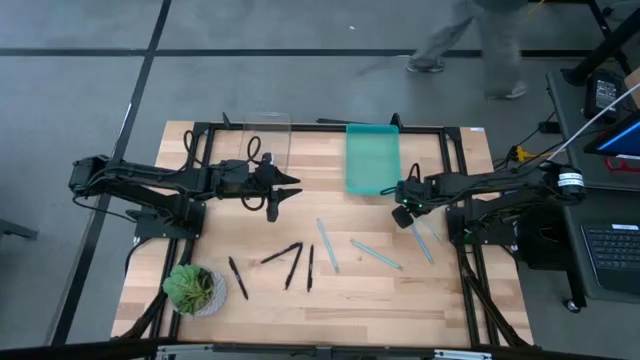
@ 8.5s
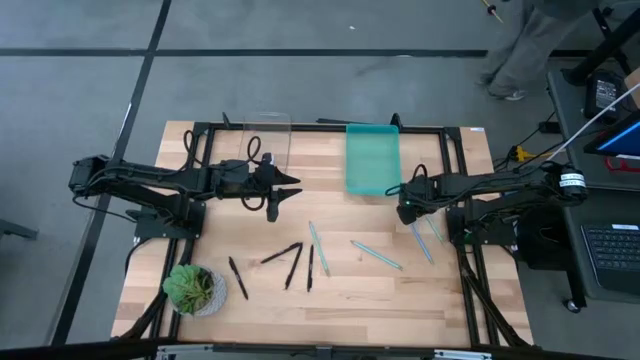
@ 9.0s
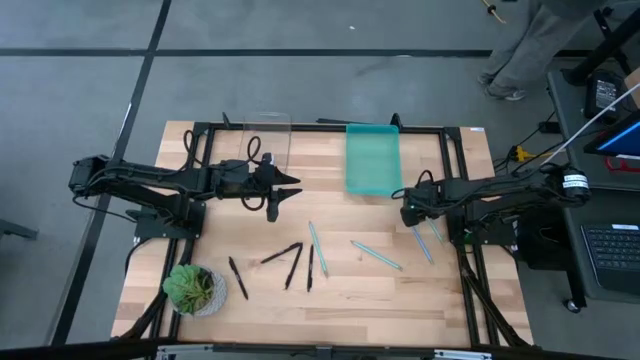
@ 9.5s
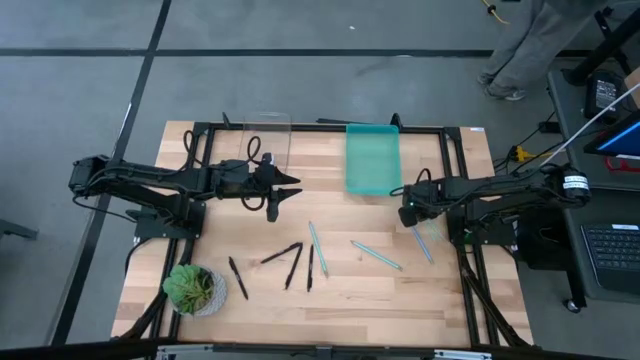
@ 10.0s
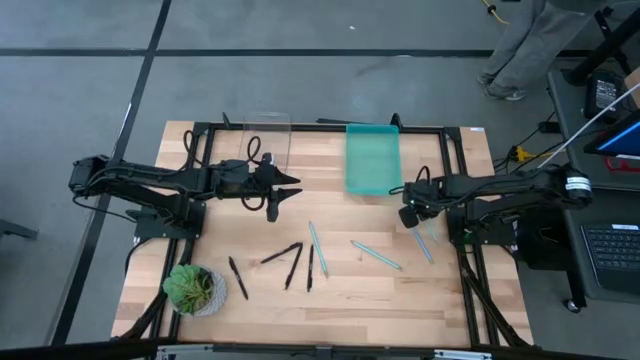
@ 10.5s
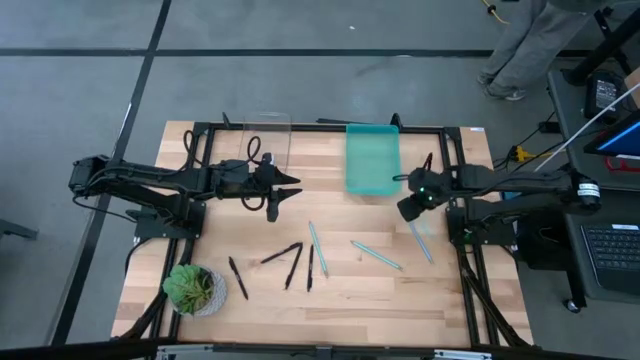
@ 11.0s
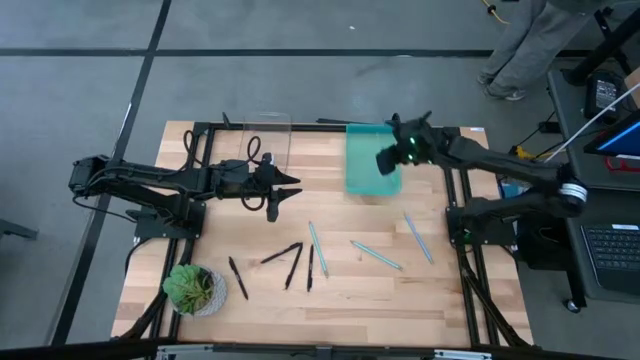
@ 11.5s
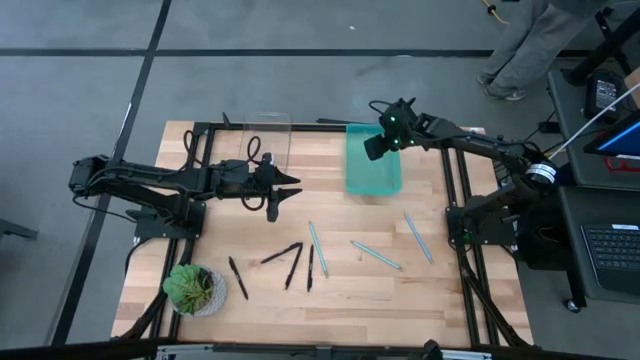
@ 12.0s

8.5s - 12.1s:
Task: Sort pens & pencils
Put the blue pencil into the blue bin

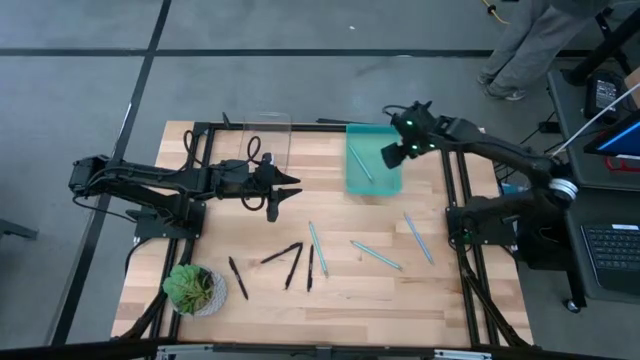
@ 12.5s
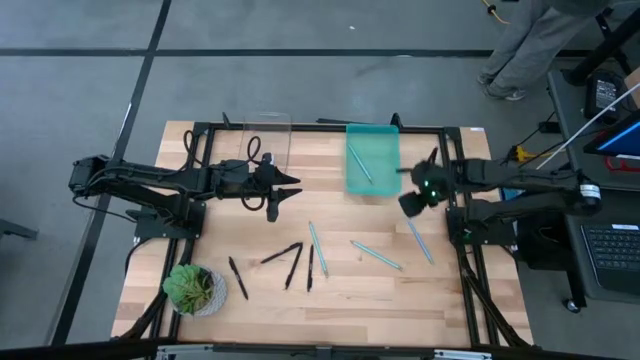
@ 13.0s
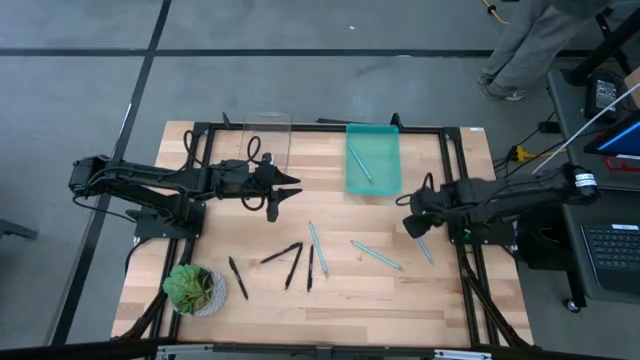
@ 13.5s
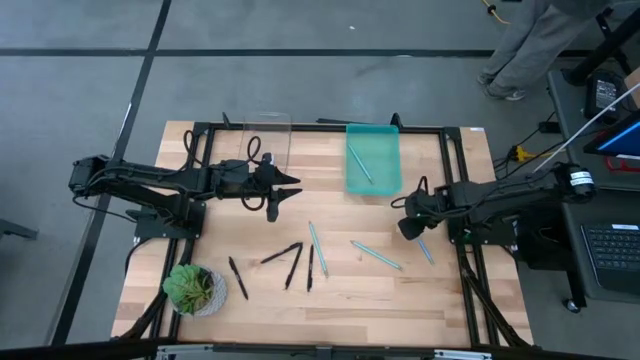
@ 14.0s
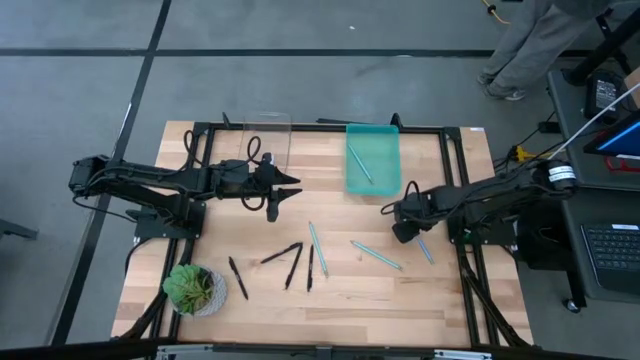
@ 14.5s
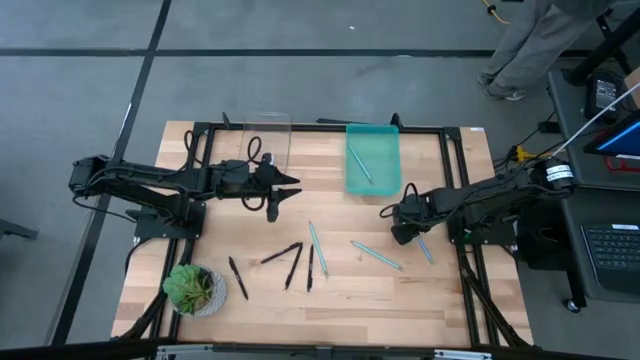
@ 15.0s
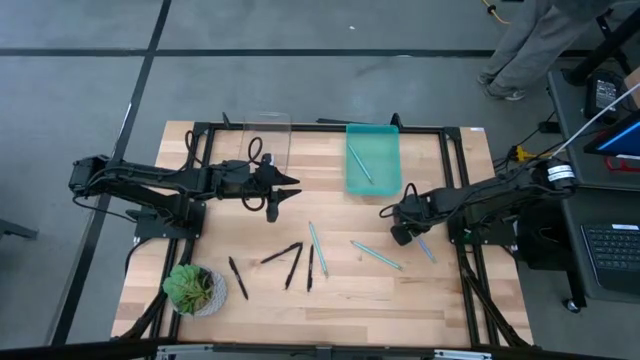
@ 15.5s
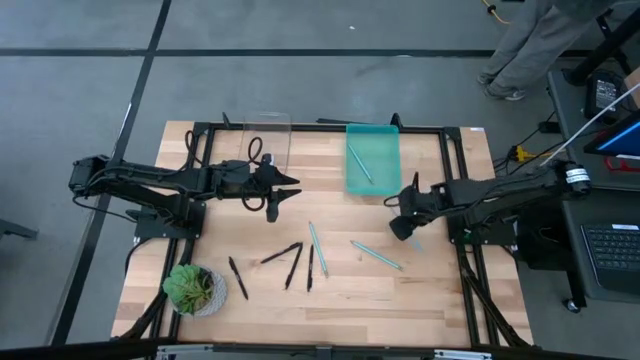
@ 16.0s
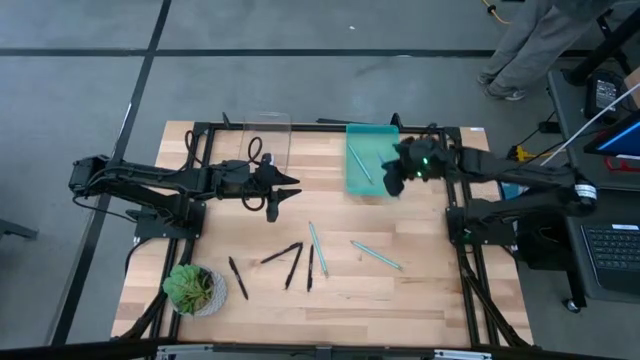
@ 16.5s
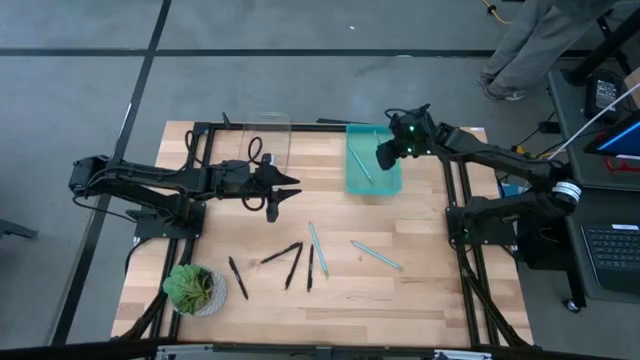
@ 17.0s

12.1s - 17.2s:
Put the blue pencil into the blue bin

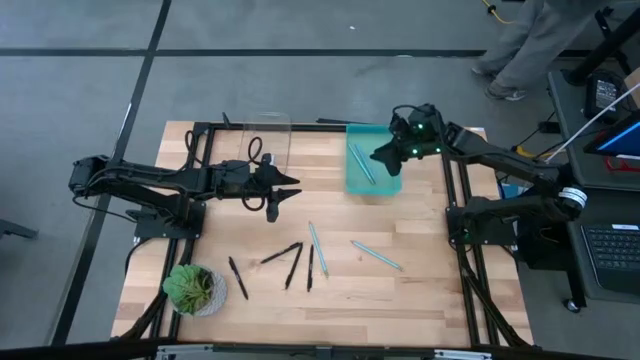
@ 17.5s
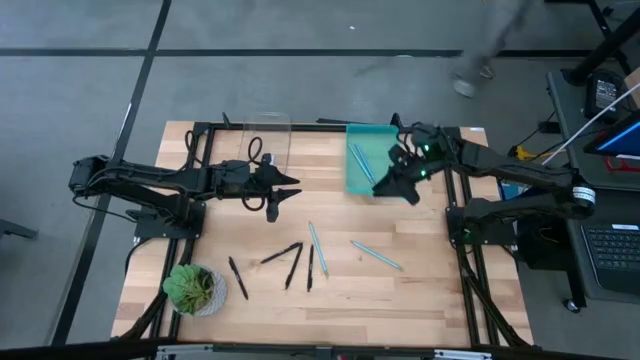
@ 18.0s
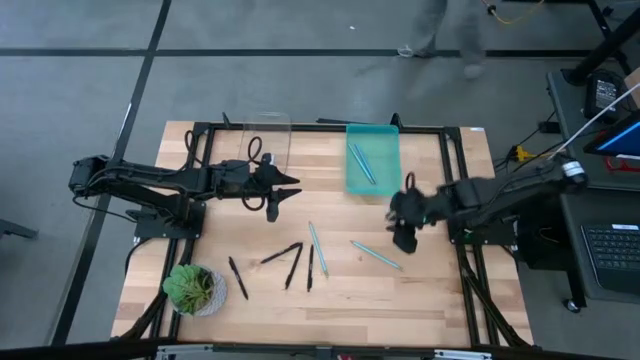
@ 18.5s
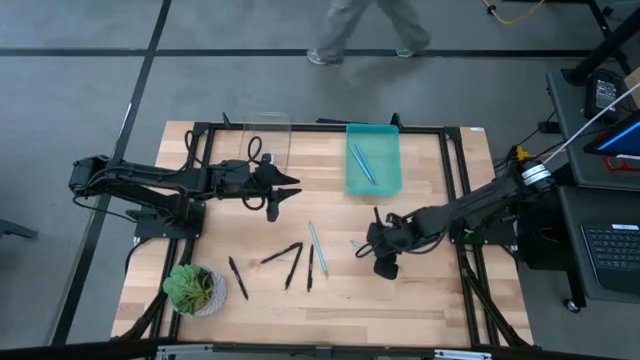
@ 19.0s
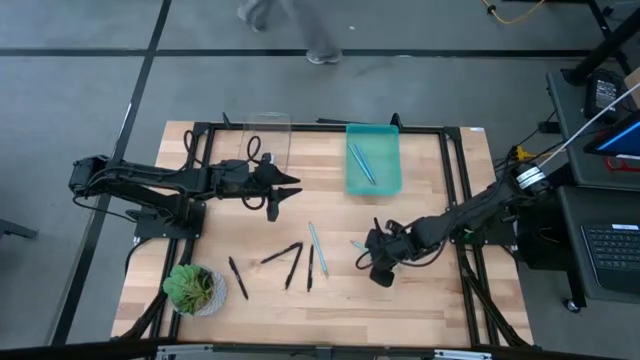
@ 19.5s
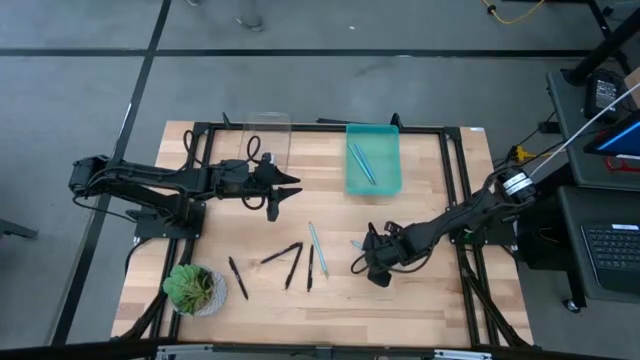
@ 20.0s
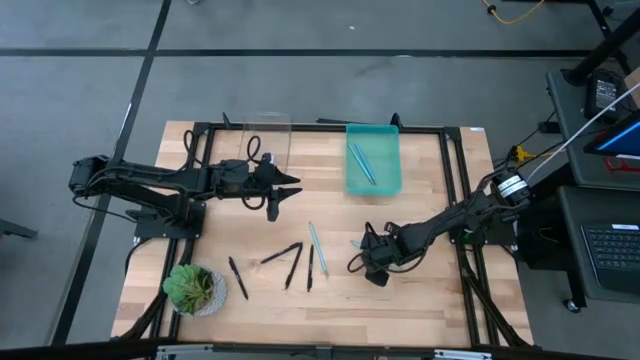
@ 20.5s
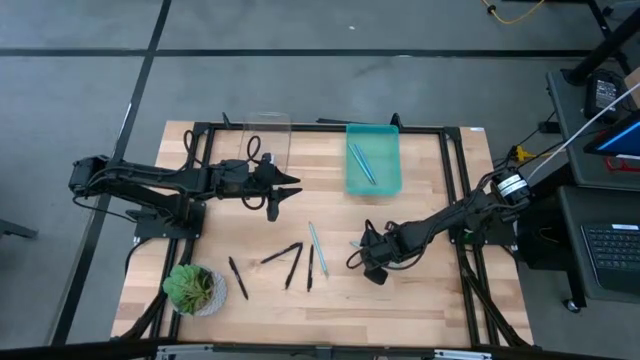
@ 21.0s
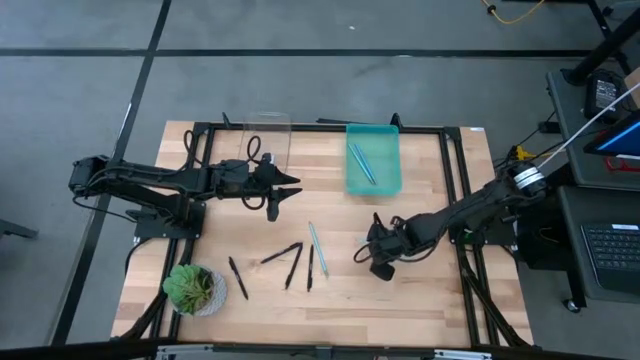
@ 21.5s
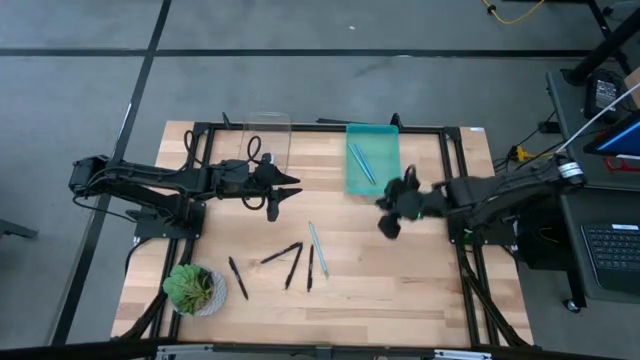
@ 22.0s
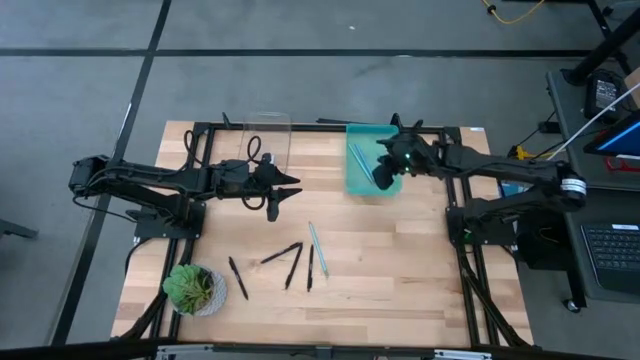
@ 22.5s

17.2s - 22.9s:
Put the blue pencil into the blue bin

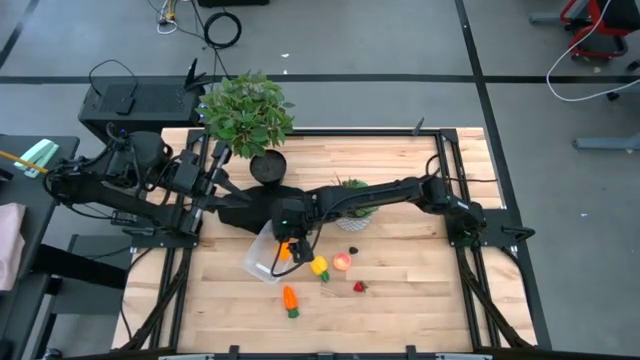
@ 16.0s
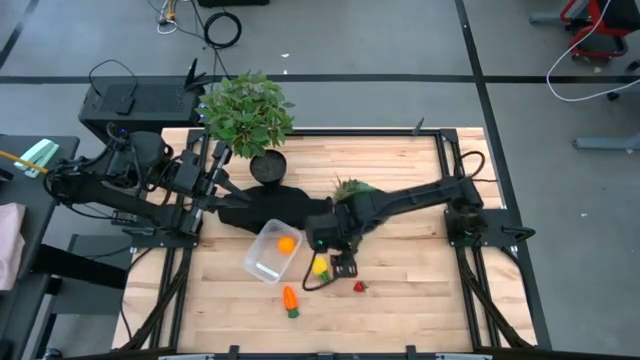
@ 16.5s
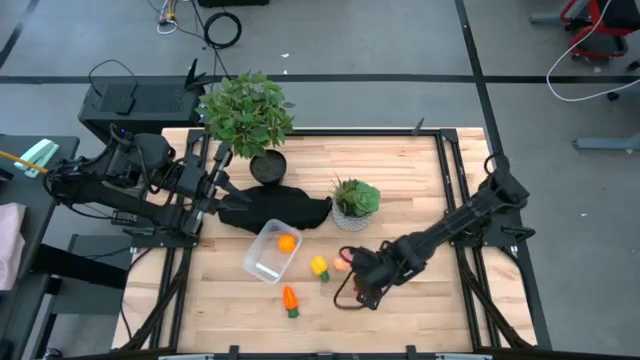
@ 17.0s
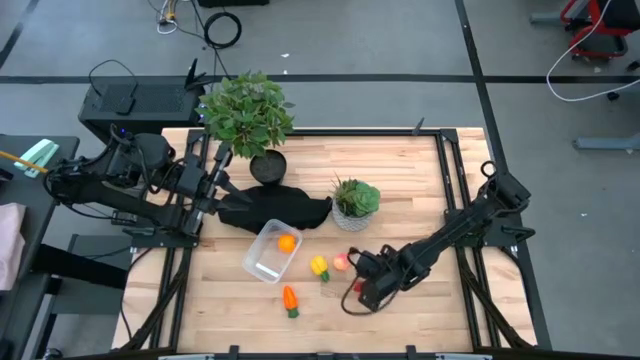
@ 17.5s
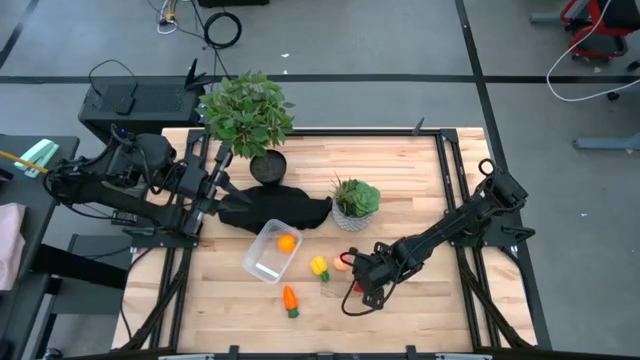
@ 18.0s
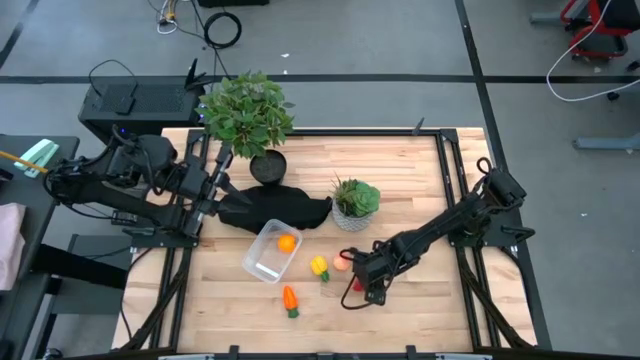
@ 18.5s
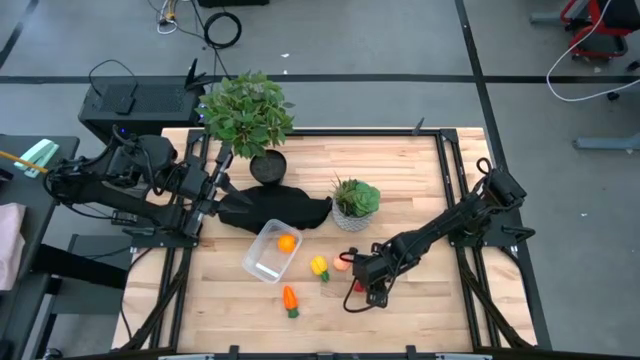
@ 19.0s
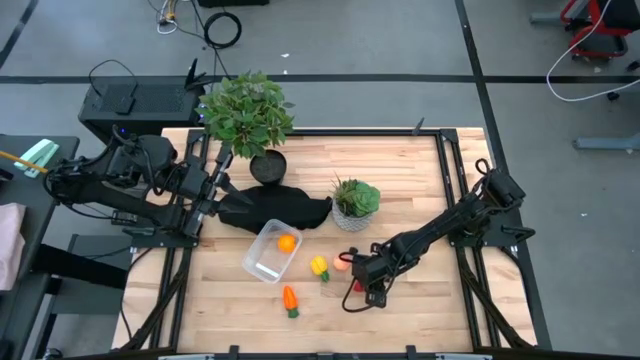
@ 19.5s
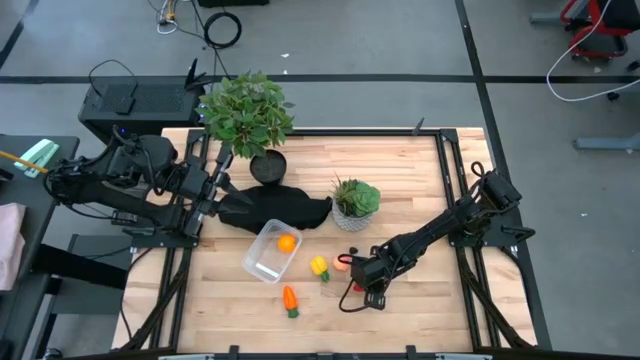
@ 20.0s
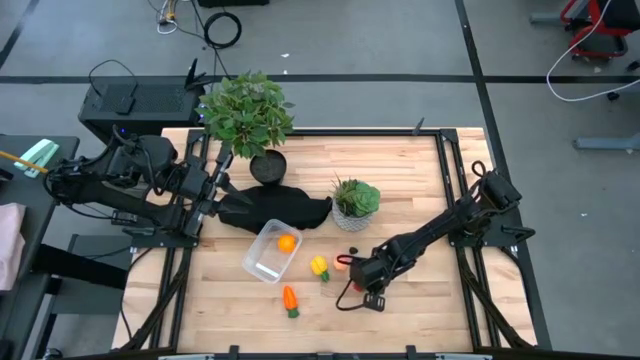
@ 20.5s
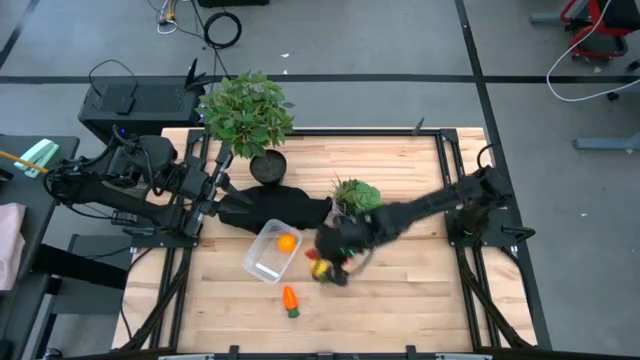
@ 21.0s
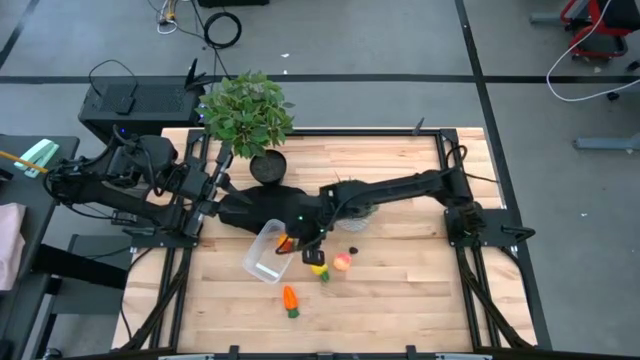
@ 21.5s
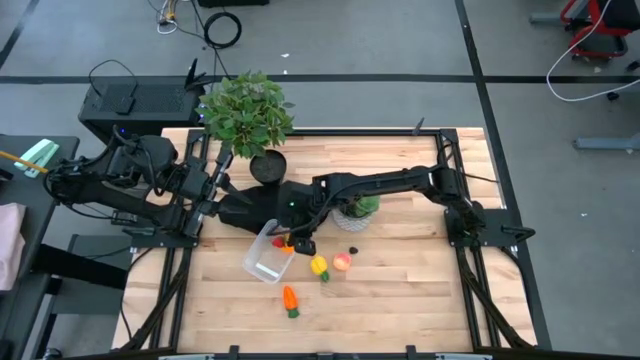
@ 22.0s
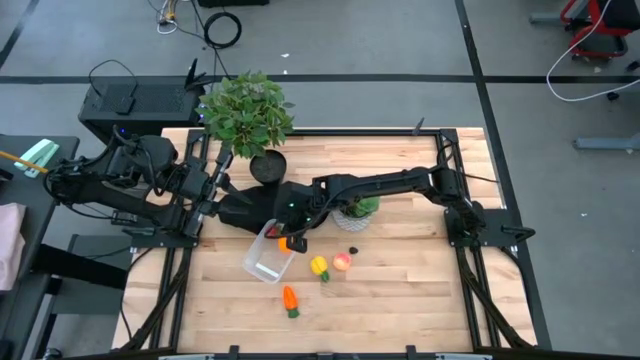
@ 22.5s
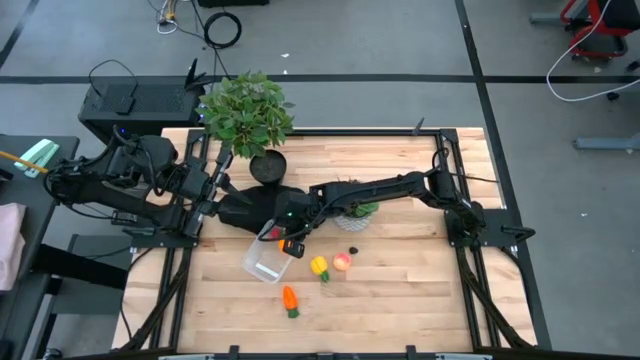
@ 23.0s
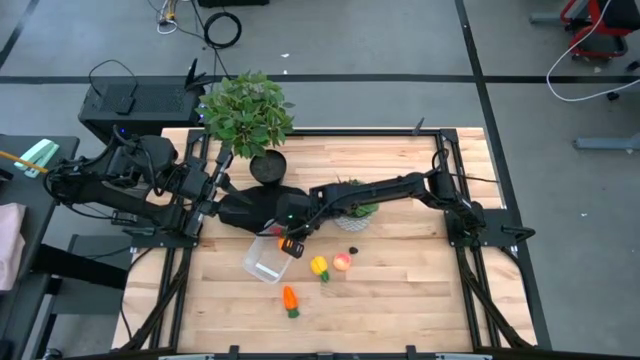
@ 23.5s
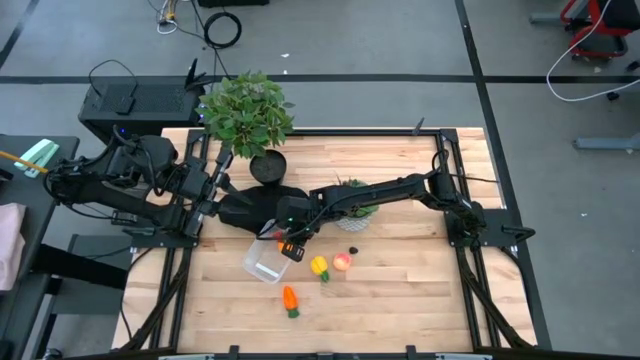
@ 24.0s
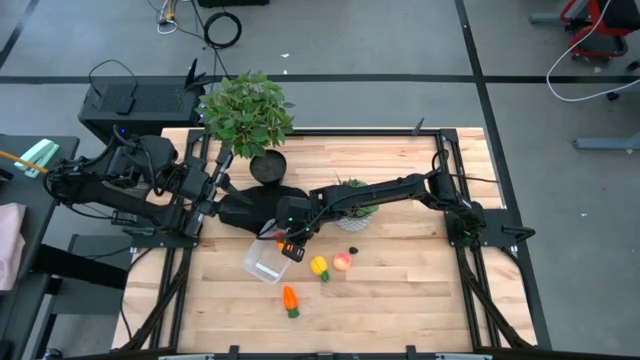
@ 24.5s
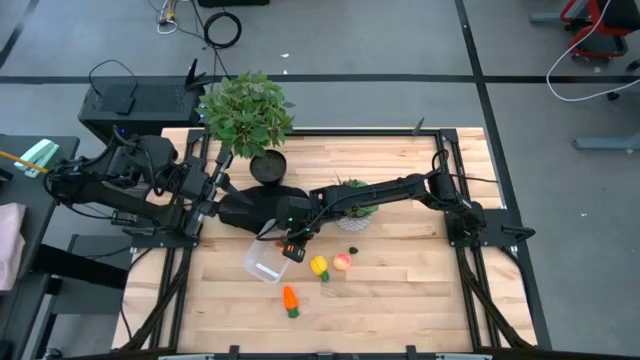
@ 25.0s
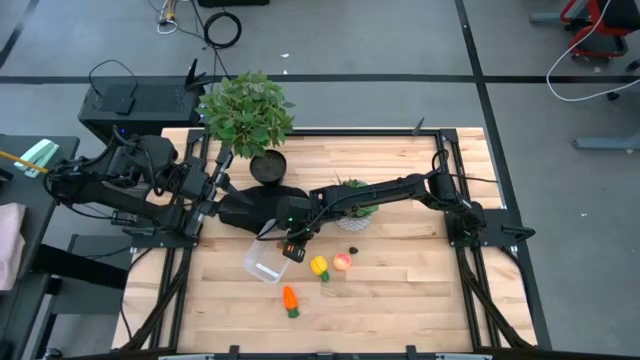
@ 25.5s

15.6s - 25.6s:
Task: Pick and placing Produce into tupperware
Put the strawberry into the transparent bin
